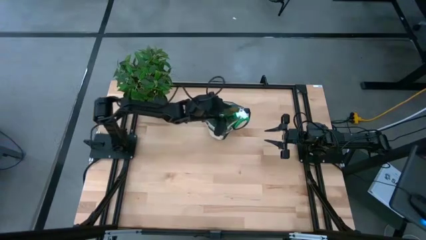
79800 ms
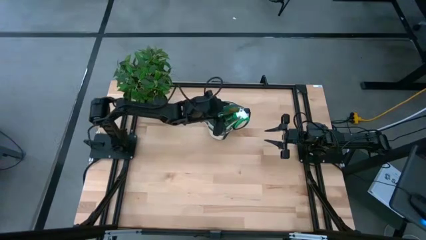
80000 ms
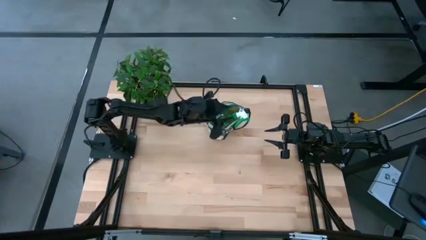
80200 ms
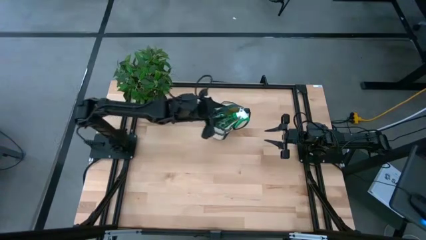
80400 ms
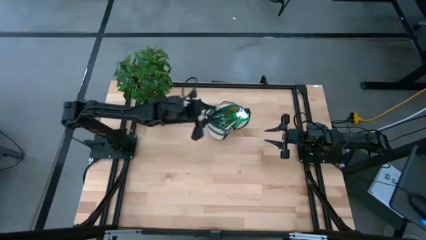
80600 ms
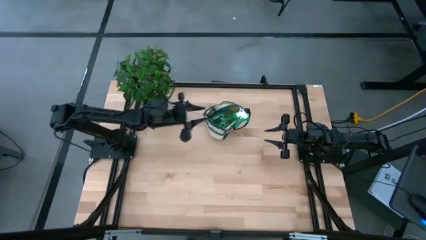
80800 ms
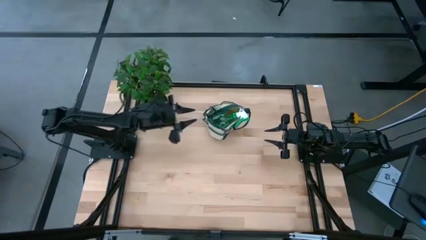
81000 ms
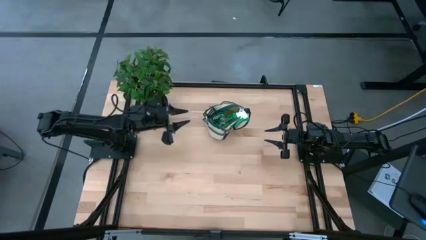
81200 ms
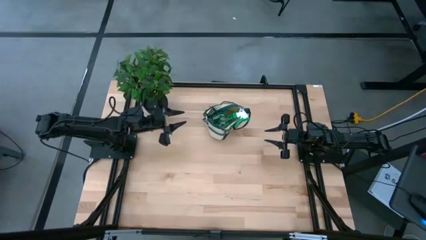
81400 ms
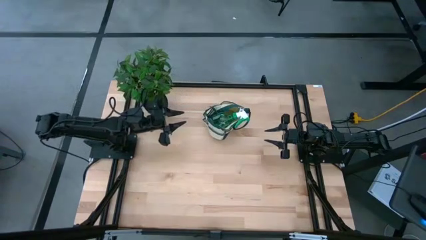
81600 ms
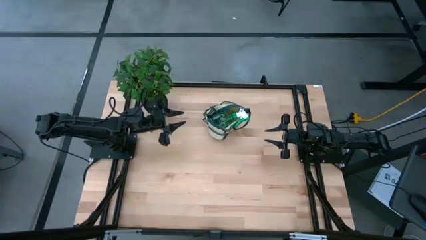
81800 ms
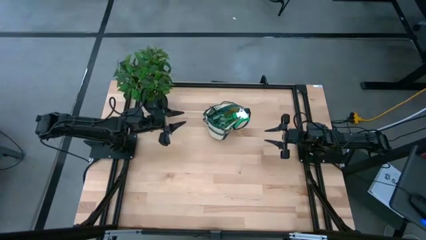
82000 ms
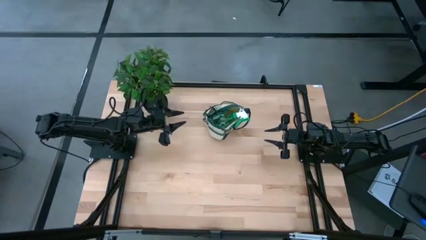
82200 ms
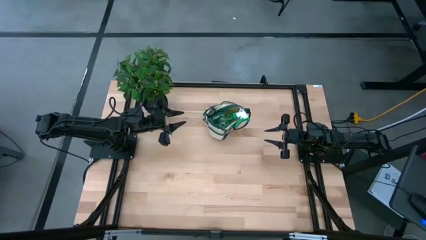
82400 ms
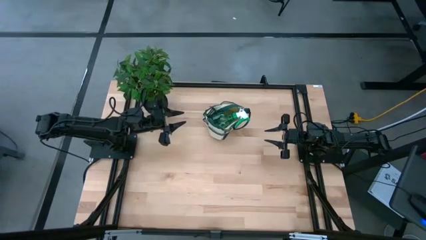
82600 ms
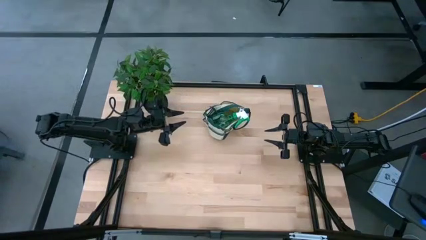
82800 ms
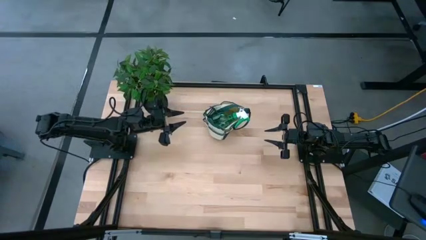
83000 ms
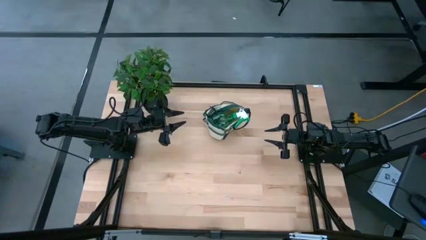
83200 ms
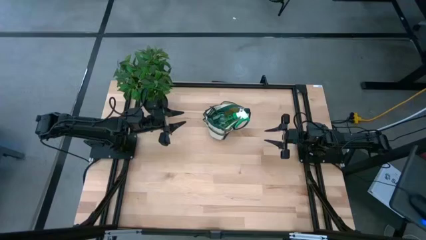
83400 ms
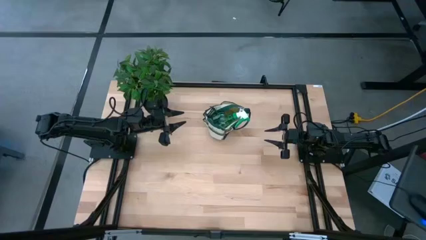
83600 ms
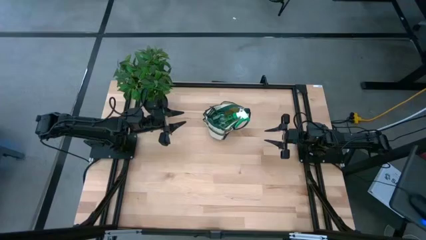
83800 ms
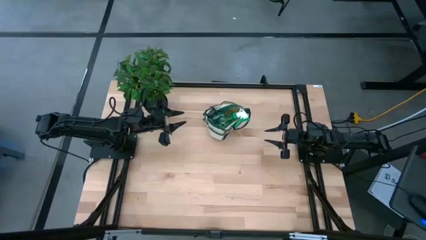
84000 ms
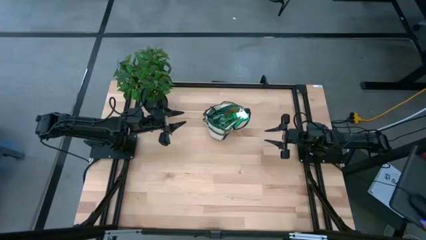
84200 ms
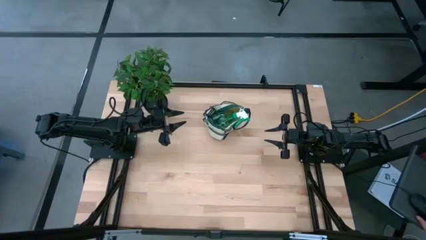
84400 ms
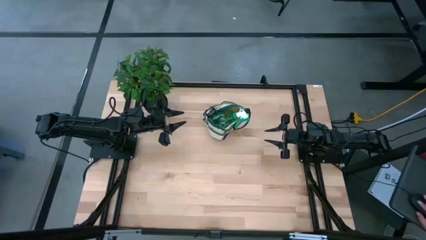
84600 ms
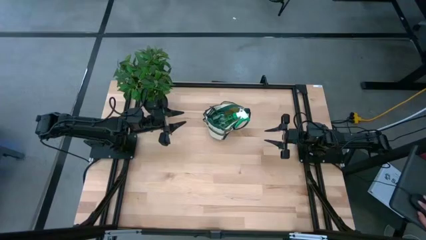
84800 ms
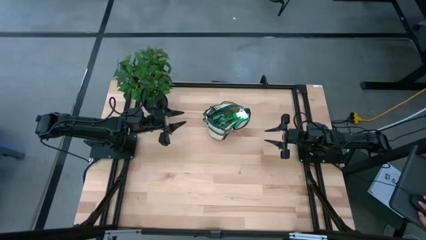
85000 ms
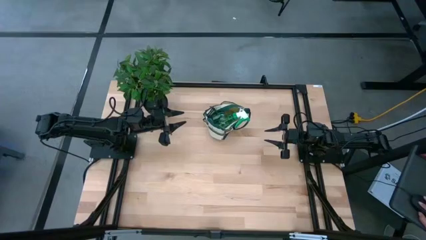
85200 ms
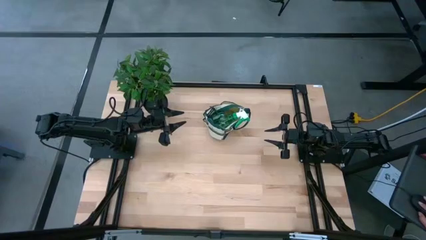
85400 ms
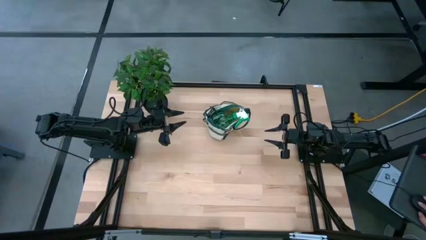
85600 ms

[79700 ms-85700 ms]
Task: Pick & Place Garden tools in Gardening bag
Return to Home Position

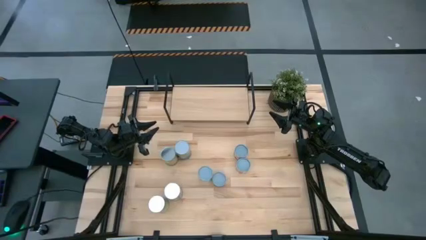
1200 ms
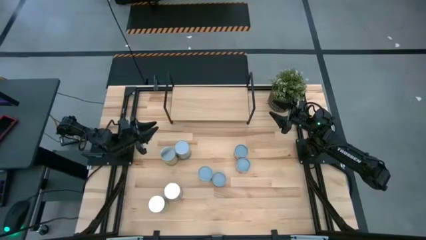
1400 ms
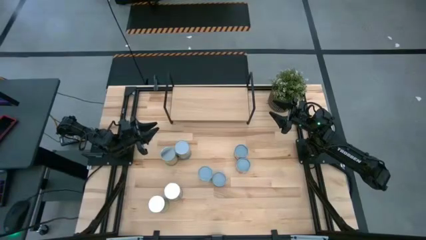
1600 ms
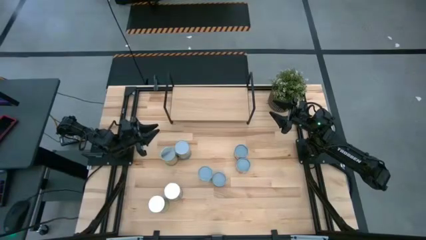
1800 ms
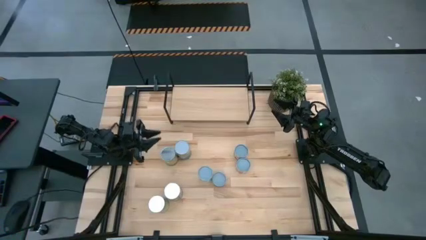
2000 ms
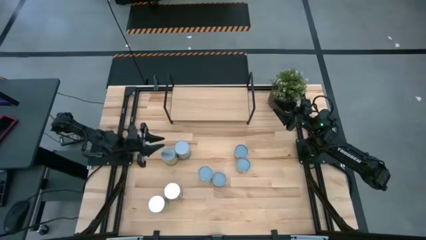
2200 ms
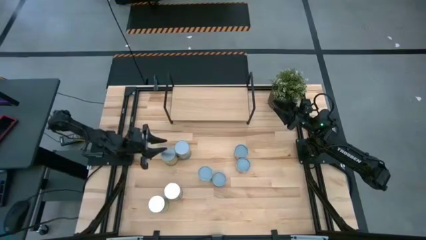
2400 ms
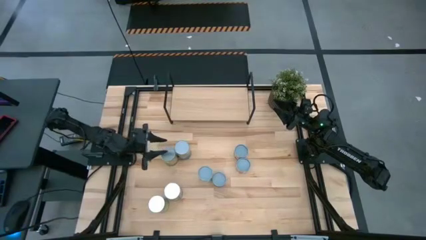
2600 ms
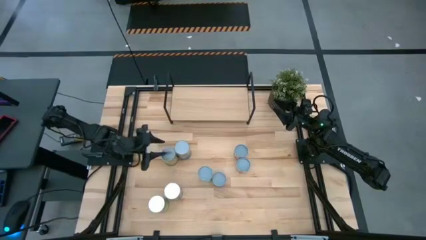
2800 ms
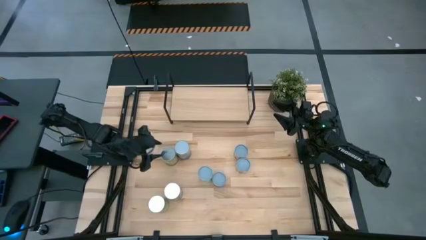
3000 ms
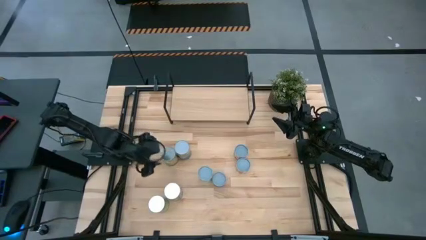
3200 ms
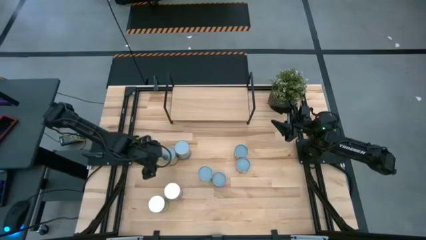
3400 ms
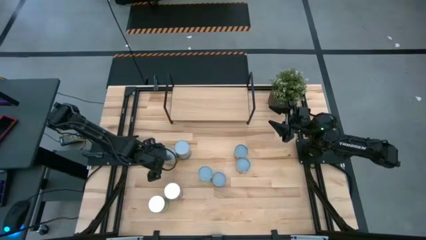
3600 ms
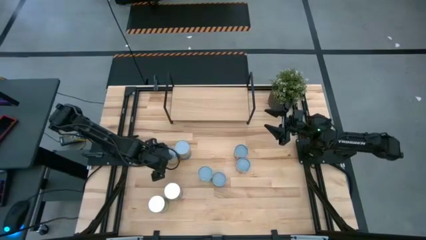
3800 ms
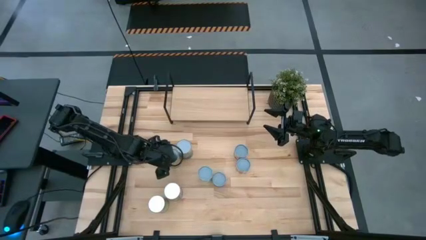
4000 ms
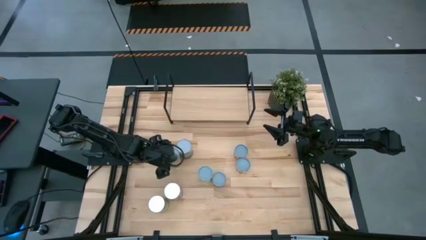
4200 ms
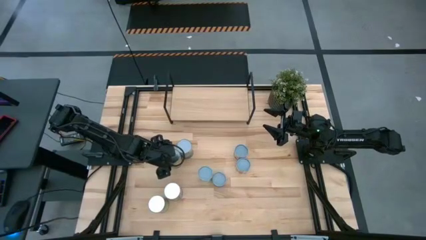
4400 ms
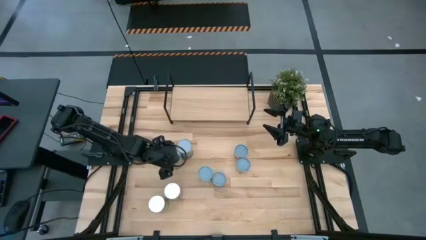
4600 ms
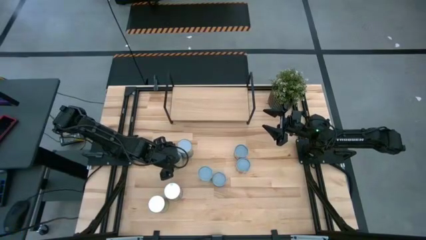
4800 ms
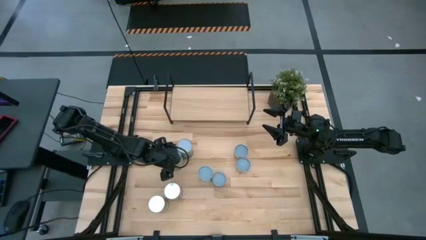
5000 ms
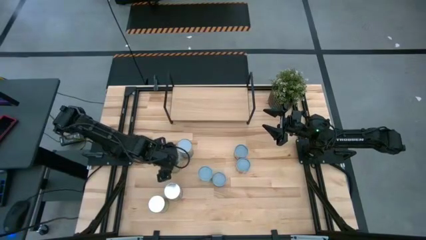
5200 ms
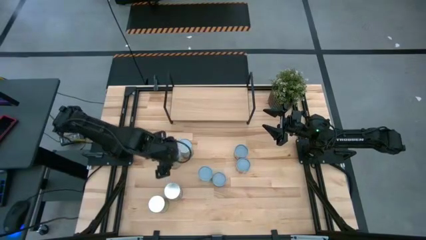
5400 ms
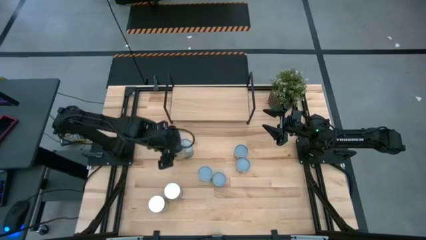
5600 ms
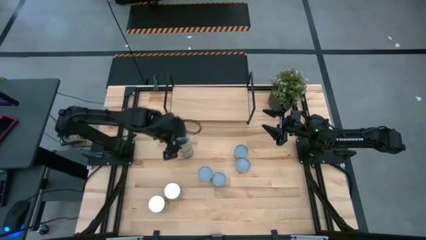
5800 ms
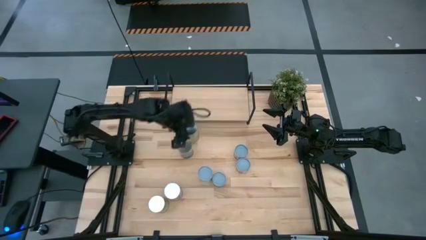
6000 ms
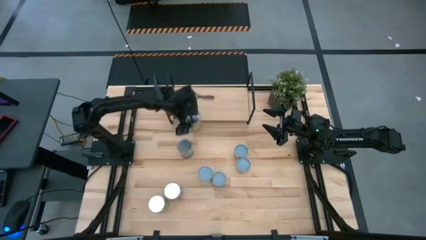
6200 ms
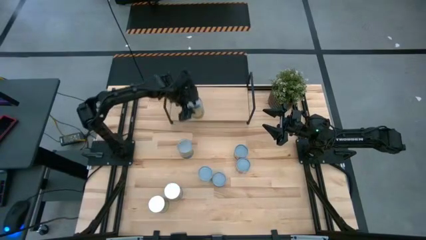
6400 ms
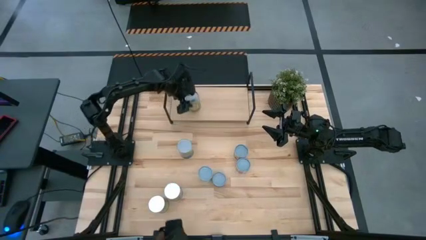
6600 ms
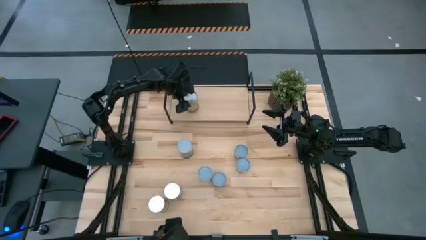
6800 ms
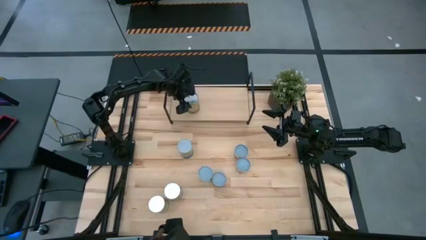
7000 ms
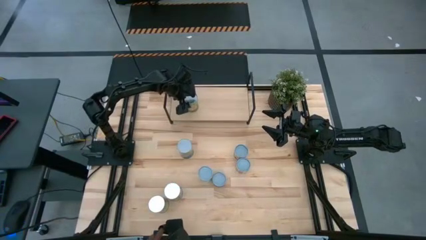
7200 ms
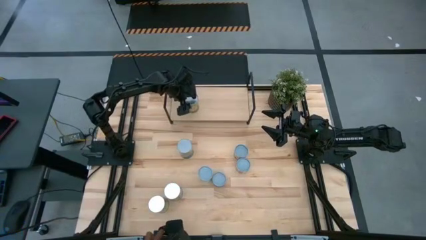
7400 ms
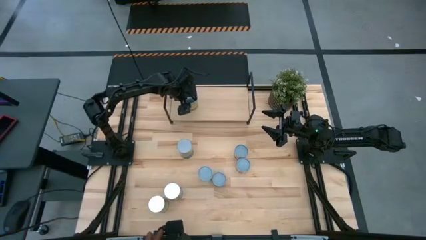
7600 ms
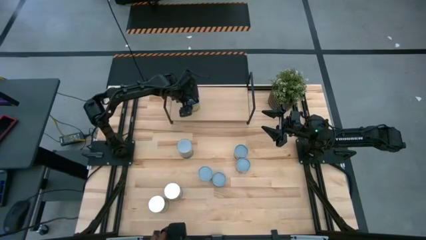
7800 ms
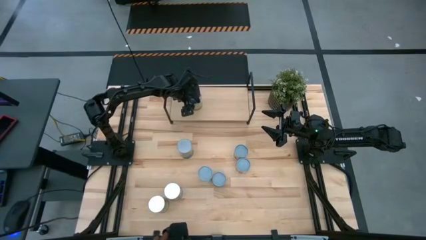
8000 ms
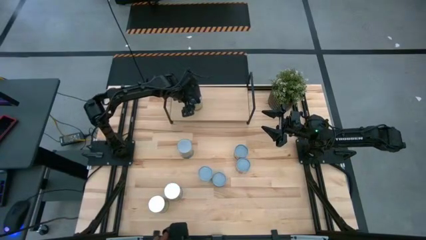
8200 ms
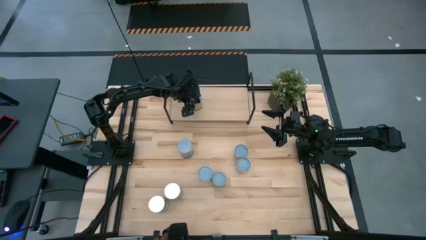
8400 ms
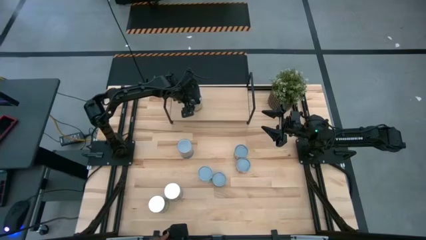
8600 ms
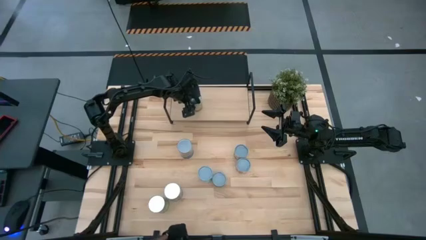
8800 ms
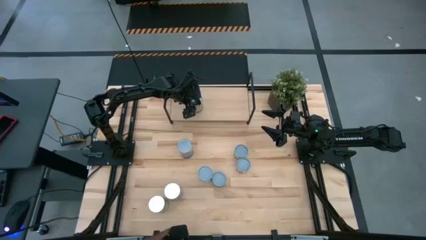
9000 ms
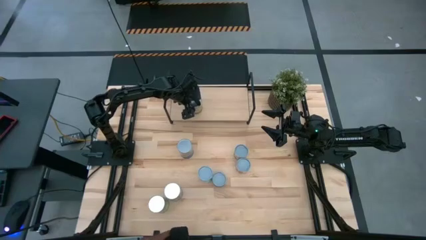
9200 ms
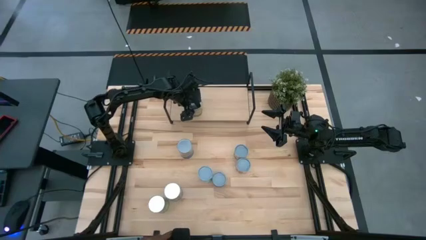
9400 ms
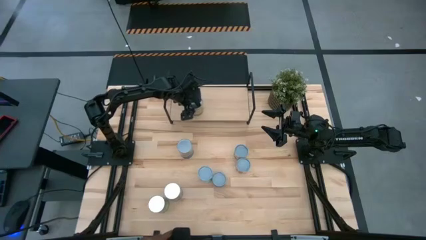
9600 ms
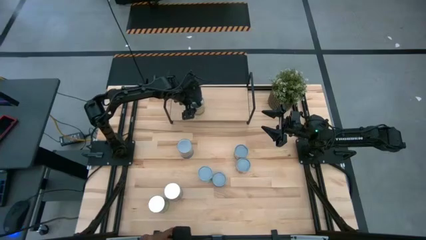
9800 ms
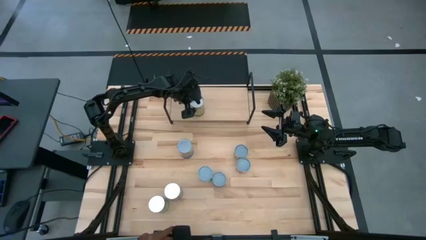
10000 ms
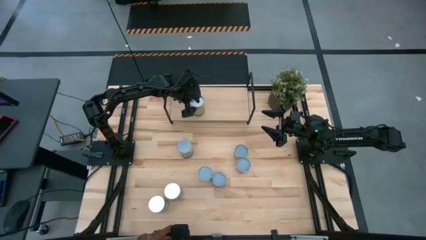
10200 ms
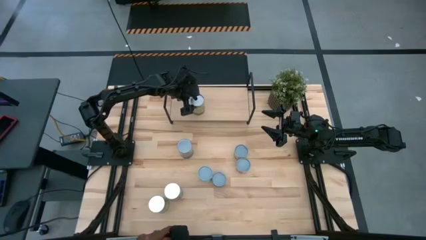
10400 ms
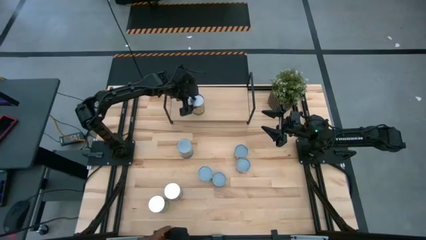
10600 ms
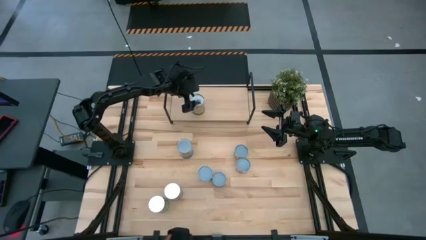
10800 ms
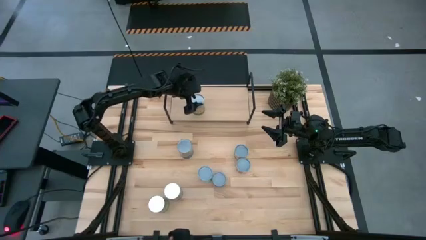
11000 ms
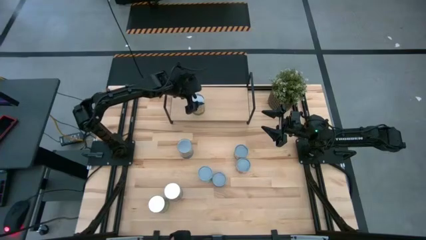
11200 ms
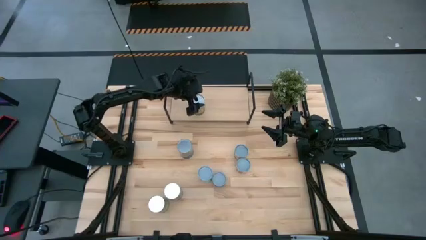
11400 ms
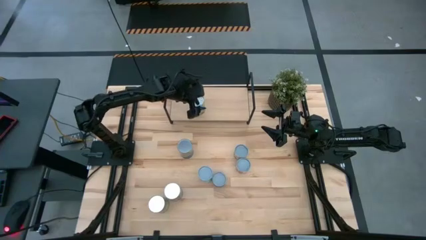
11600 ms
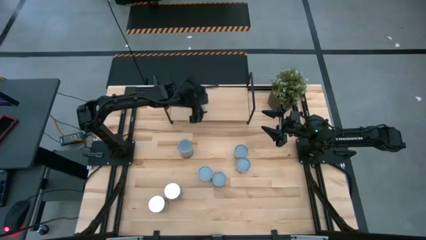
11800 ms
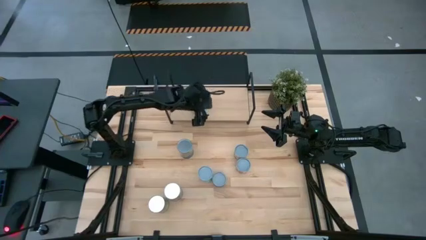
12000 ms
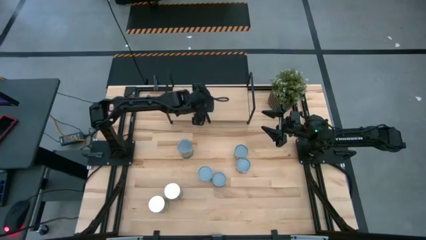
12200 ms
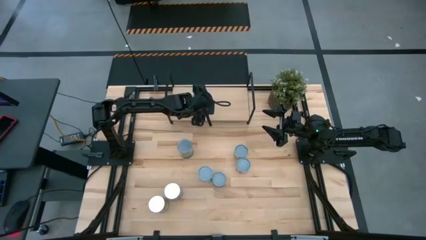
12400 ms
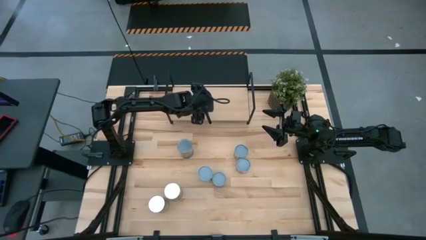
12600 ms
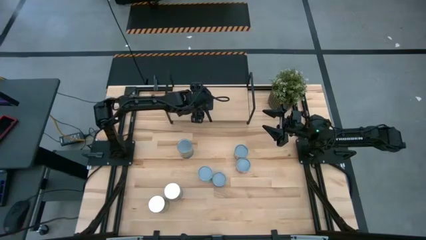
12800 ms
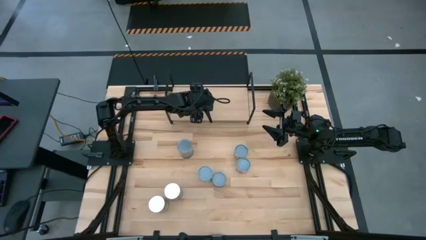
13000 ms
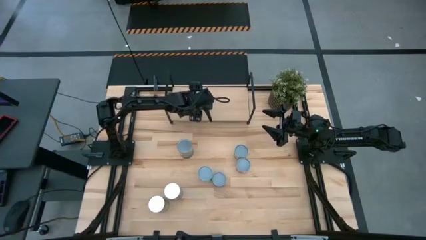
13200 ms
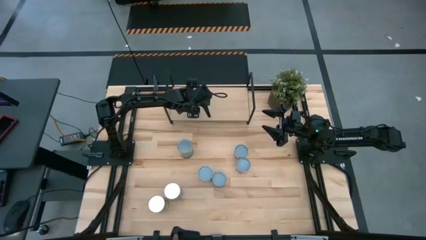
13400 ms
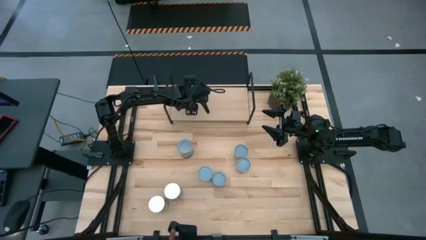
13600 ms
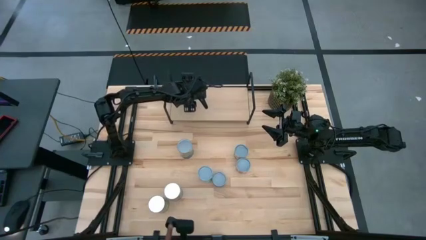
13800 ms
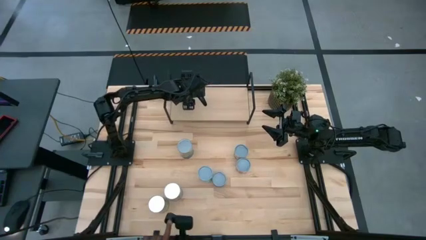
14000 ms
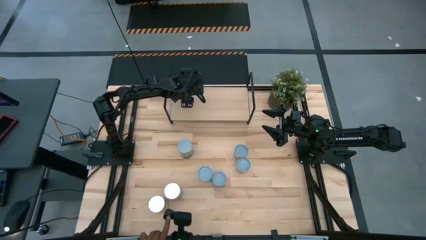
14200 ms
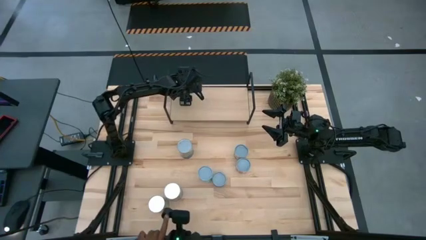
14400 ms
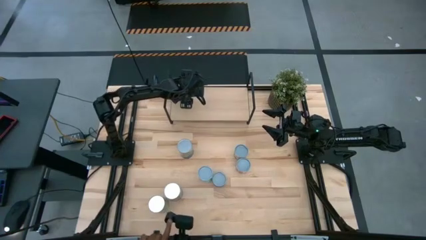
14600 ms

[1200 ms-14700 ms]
Task: Pick and place cans onto a shelf
Put the canned oranges on the shelf
